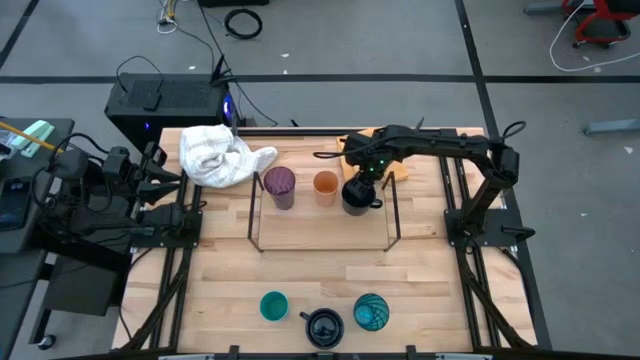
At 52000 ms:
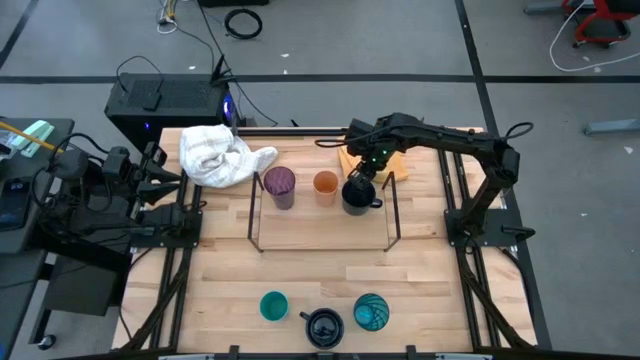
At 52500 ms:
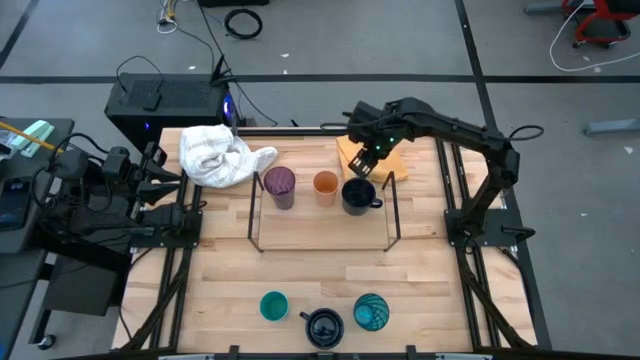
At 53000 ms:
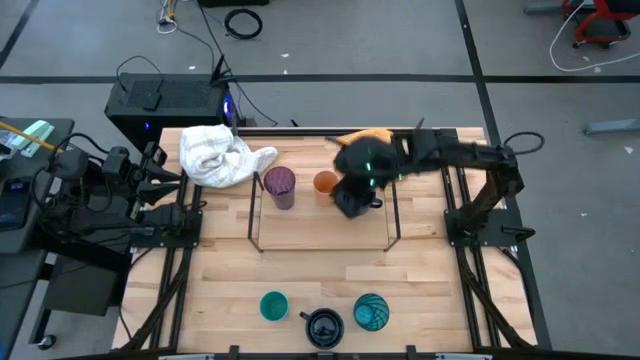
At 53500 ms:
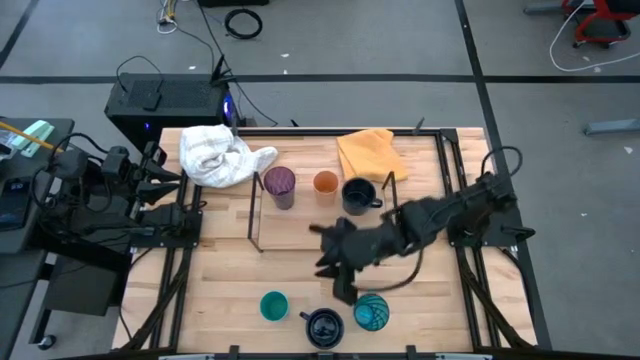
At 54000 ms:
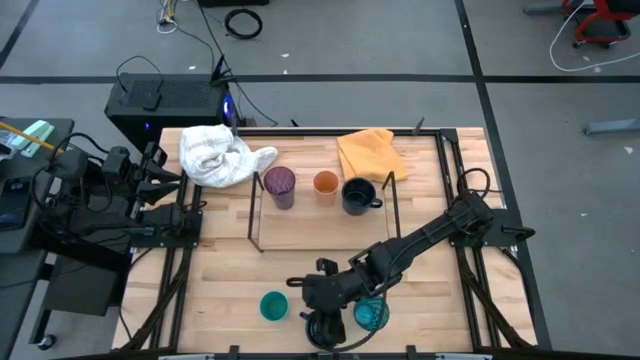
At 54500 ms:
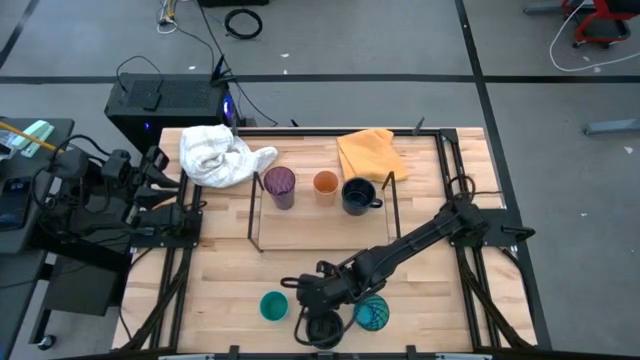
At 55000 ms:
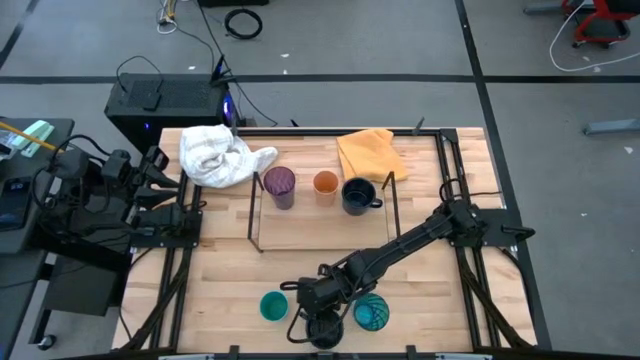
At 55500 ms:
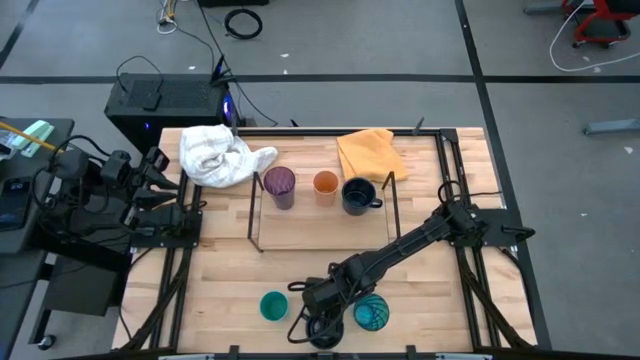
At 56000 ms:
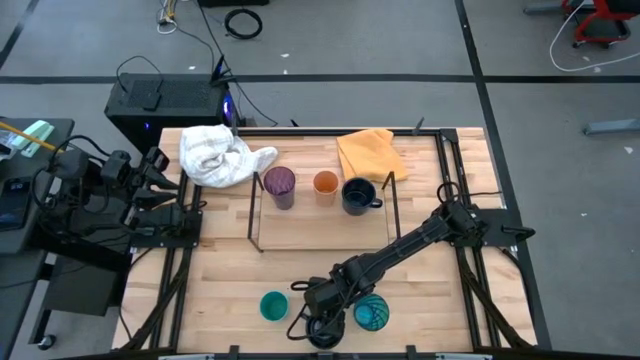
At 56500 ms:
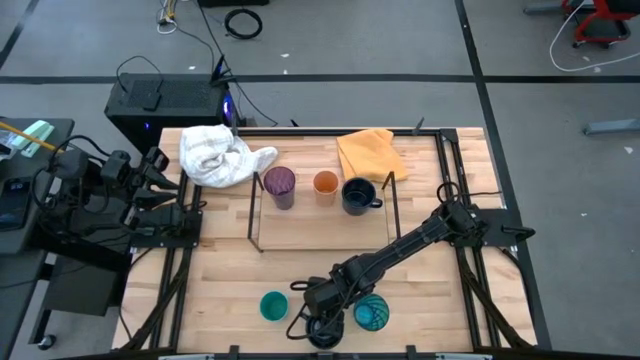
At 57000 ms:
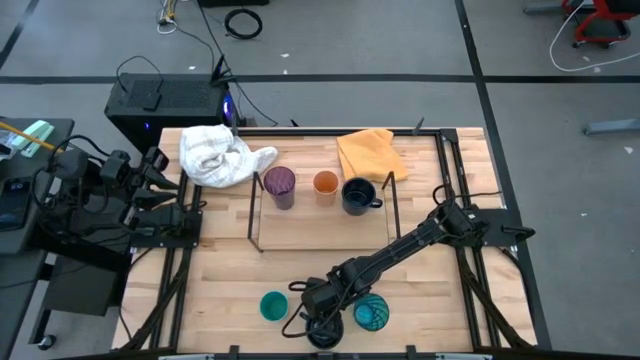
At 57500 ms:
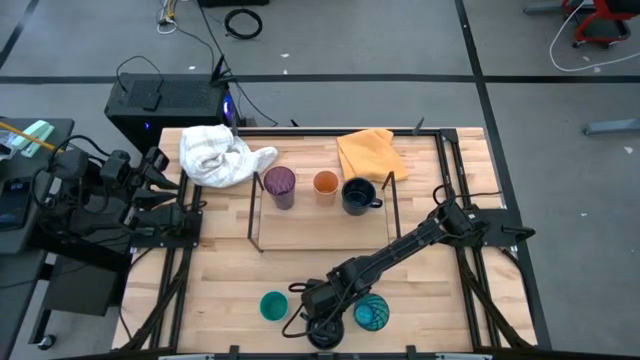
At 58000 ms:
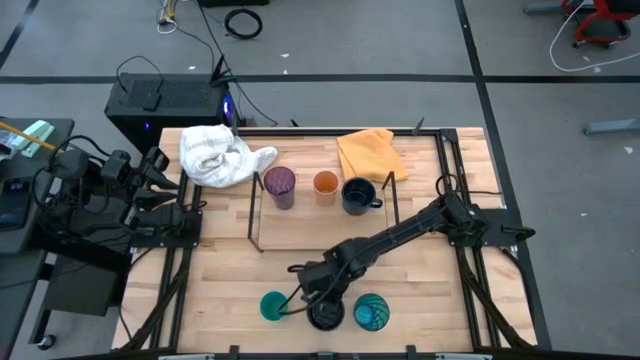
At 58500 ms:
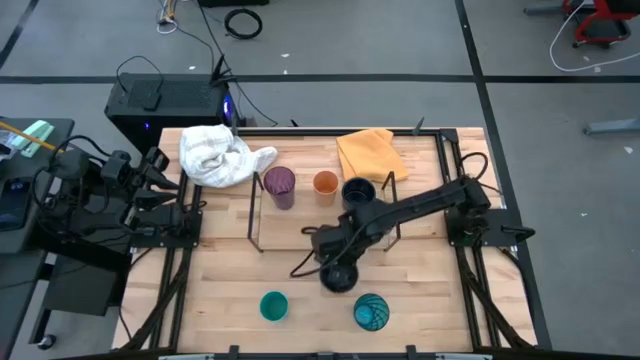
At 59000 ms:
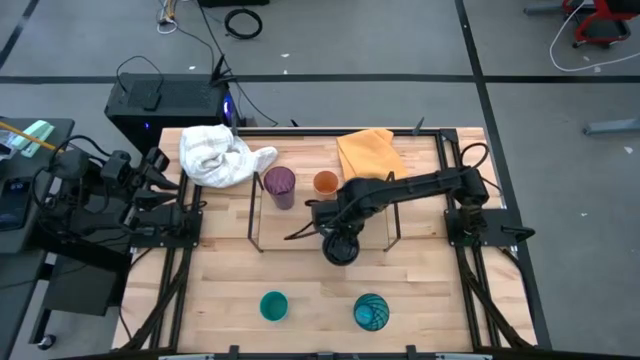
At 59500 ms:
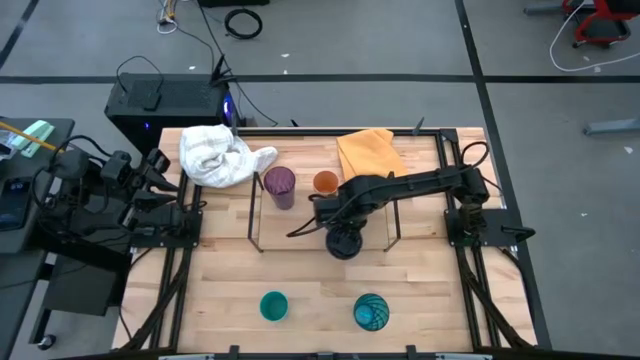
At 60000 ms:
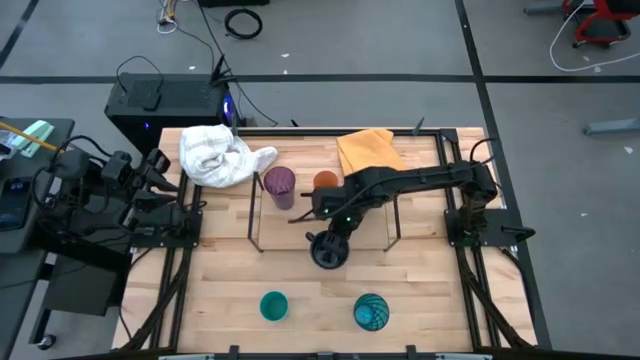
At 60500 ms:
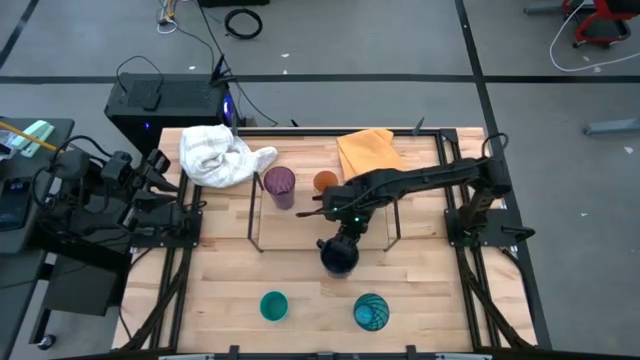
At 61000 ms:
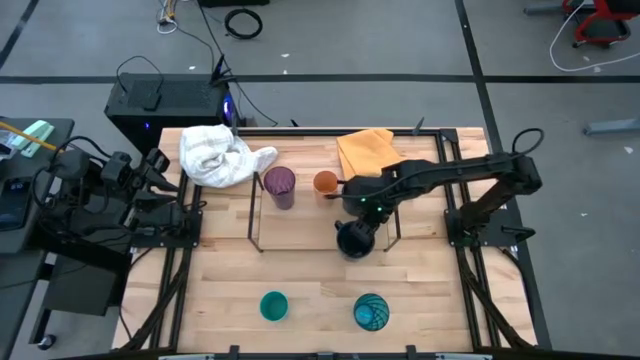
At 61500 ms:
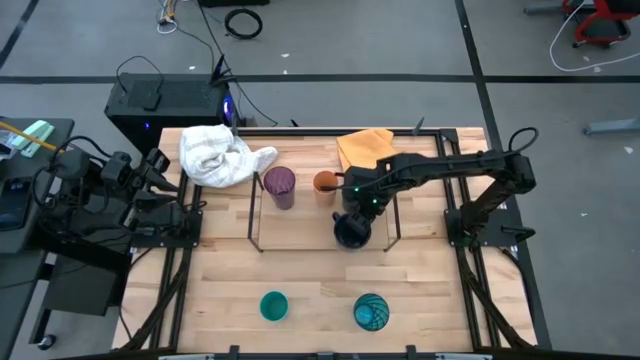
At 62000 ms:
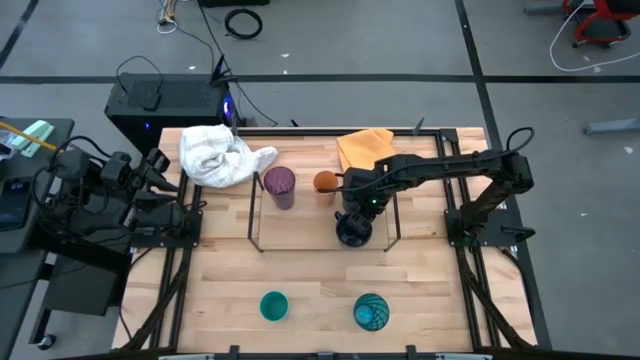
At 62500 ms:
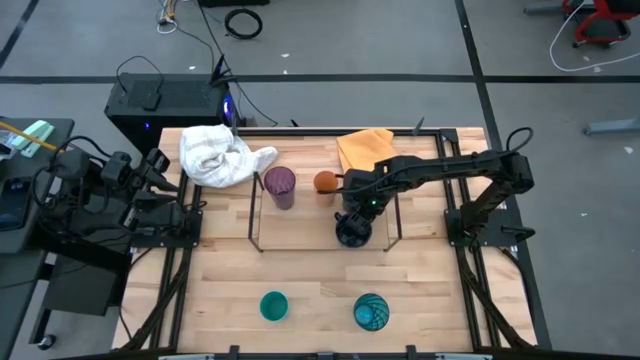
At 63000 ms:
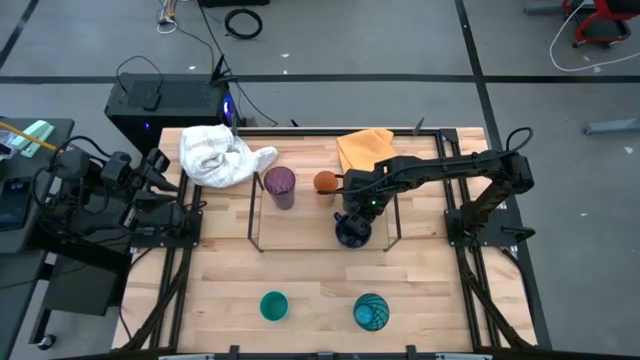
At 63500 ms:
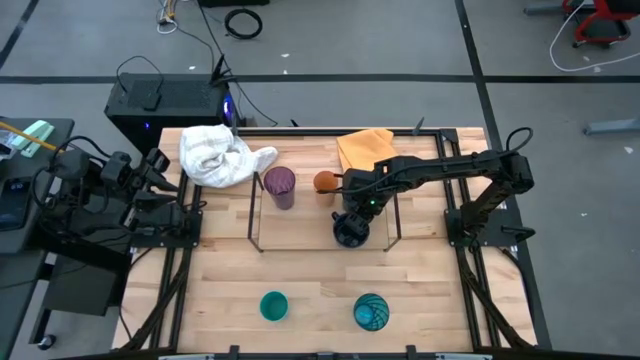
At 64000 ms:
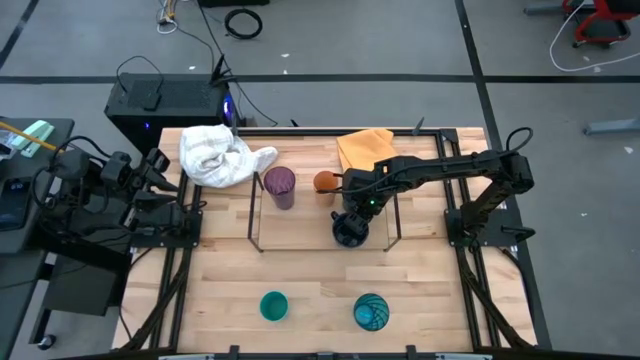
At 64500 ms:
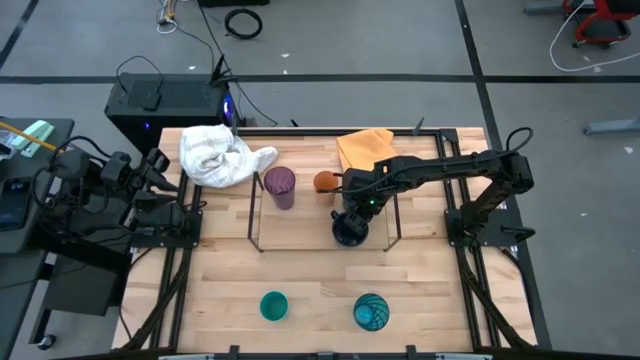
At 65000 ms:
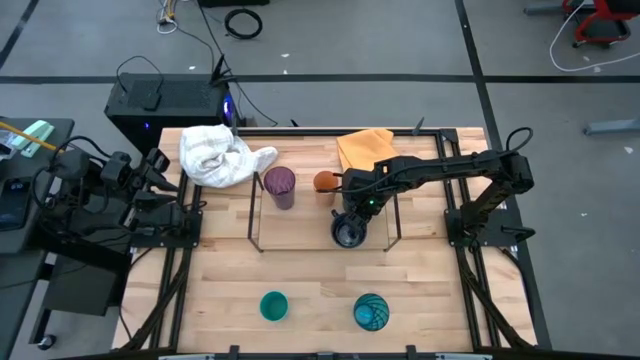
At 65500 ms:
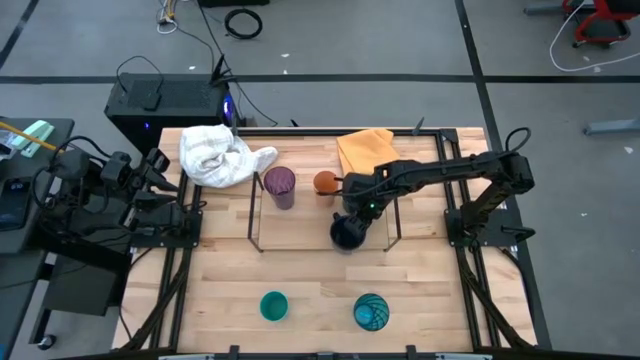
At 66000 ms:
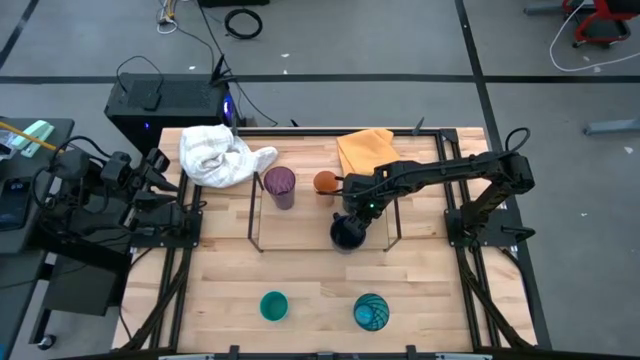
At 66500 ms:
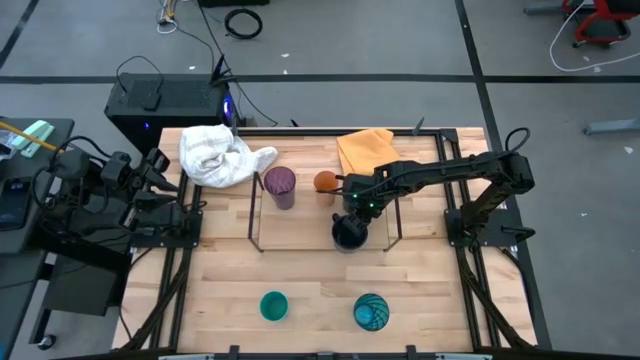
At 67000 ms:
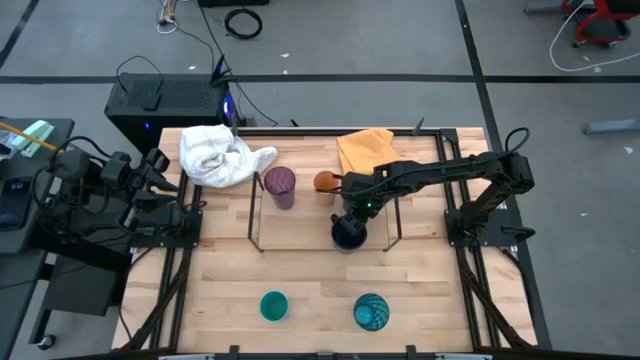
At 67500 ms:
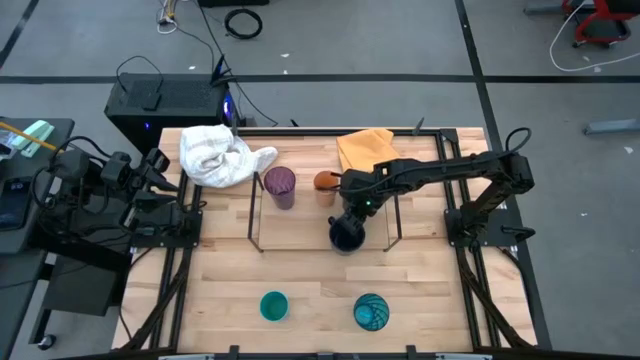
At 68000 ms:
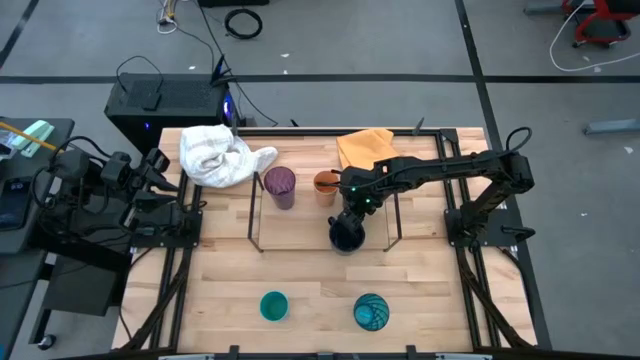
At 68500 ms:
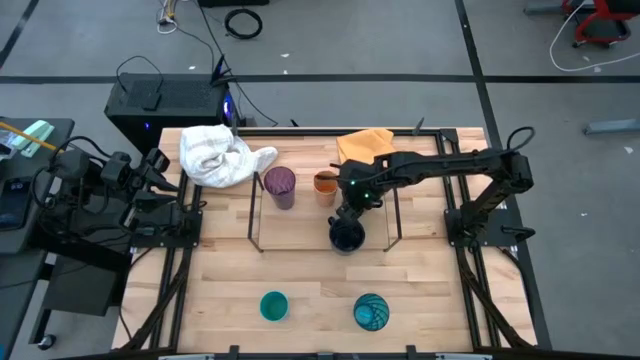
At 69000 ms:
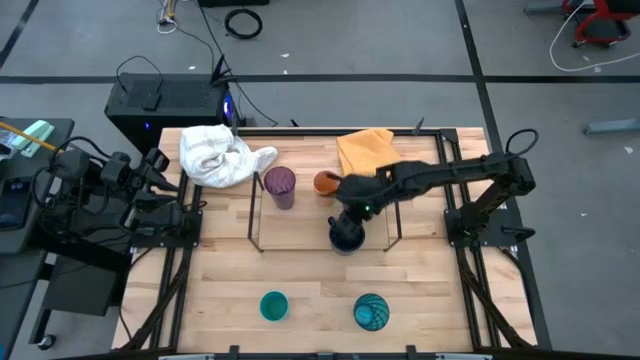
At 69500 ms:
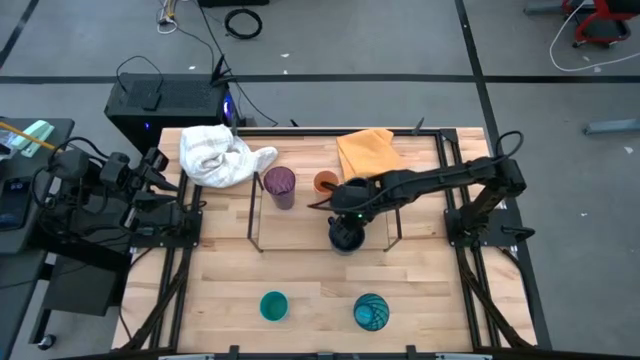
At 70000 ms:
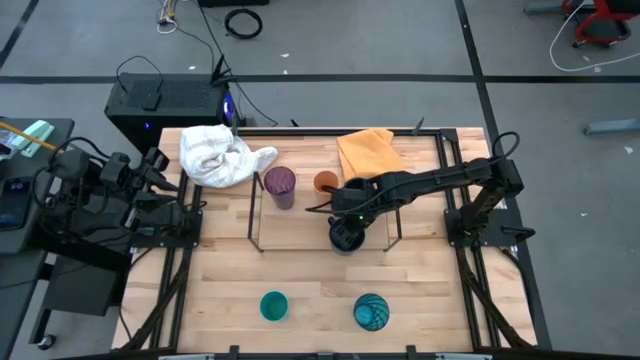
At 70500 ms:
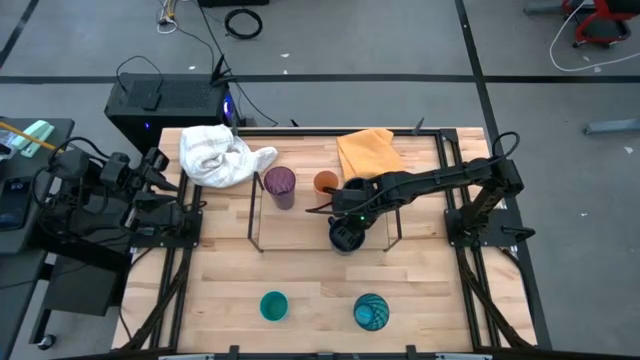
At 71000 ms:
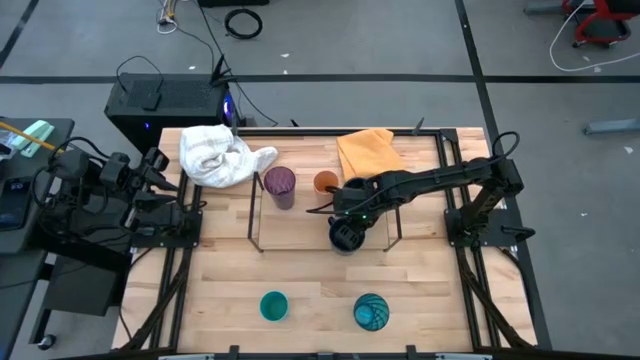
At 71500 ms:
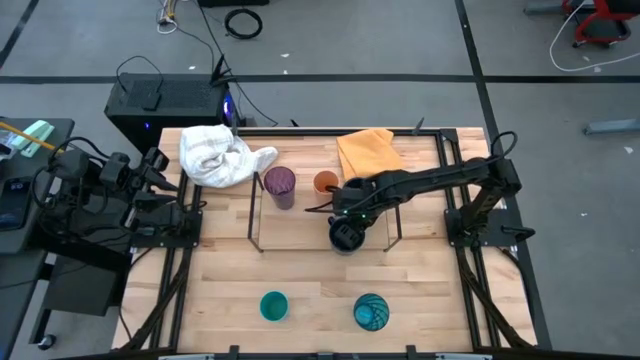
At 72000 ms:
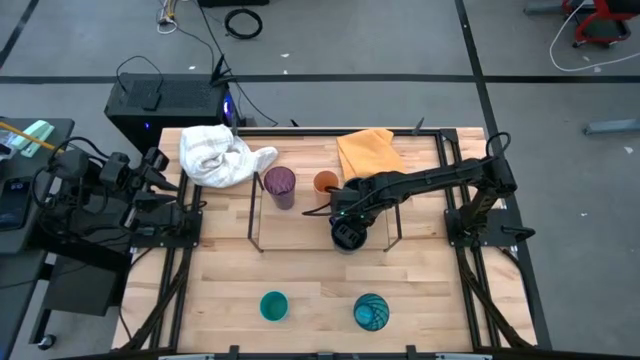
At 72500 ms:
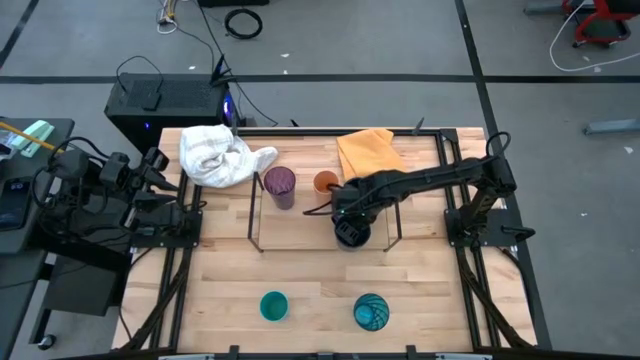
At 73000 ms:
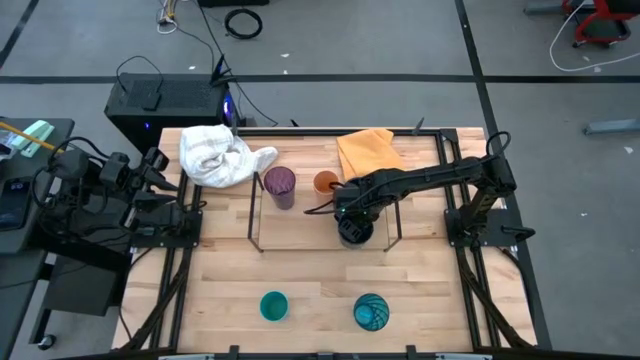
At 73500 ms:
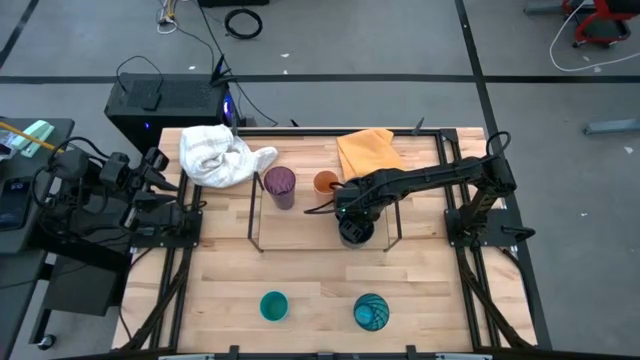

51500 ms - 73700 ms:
Task: Stack small to large cups/mugs on shelf
Put the blue mug on the shelf
